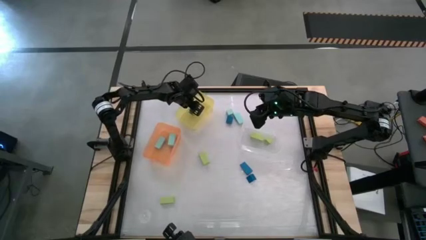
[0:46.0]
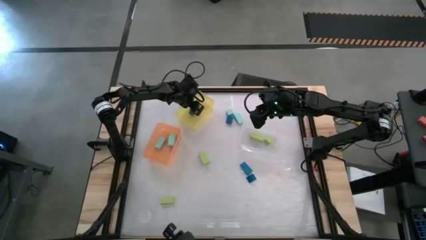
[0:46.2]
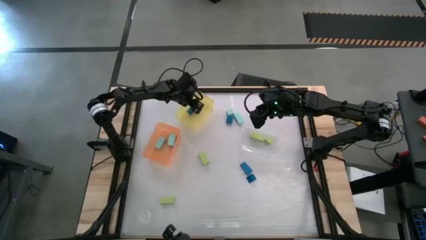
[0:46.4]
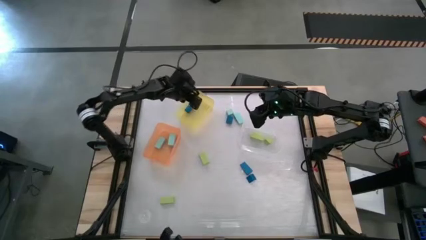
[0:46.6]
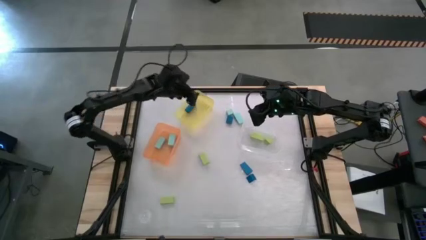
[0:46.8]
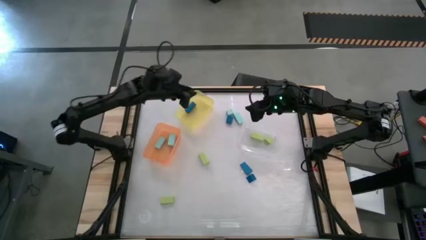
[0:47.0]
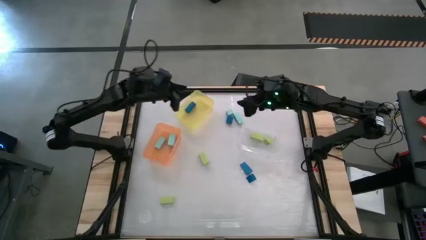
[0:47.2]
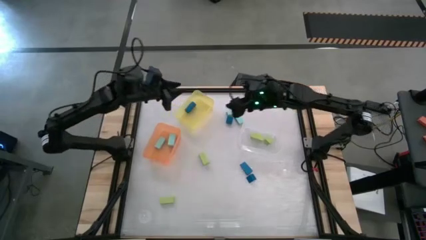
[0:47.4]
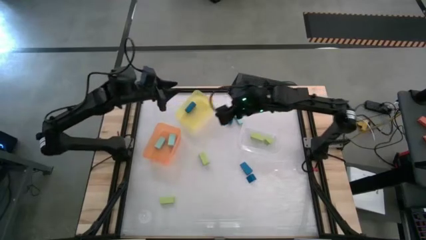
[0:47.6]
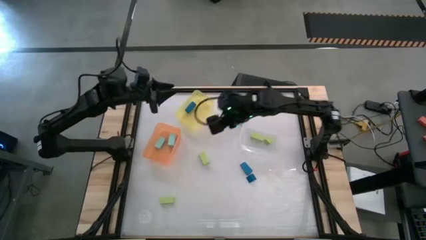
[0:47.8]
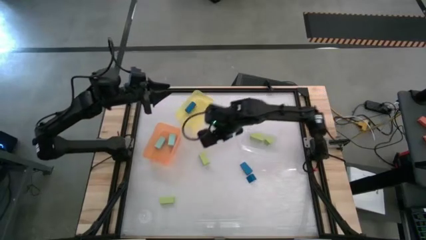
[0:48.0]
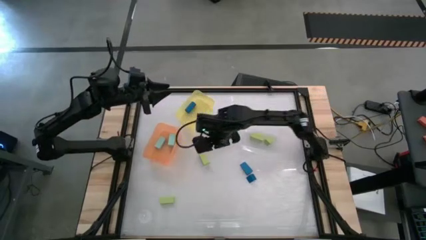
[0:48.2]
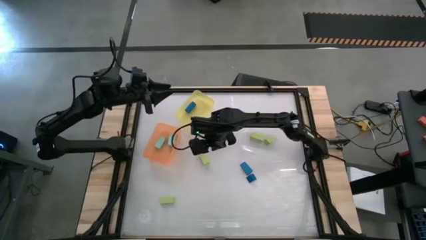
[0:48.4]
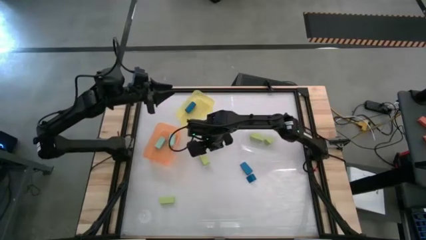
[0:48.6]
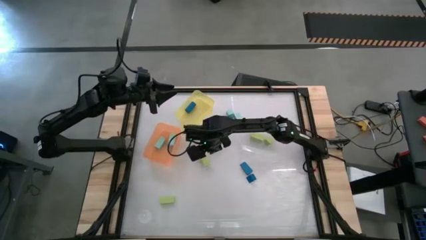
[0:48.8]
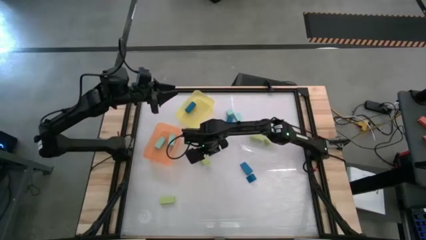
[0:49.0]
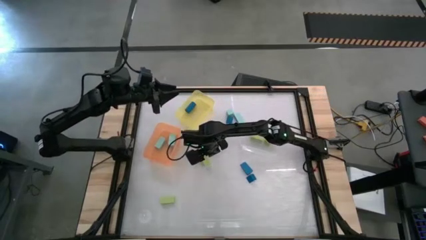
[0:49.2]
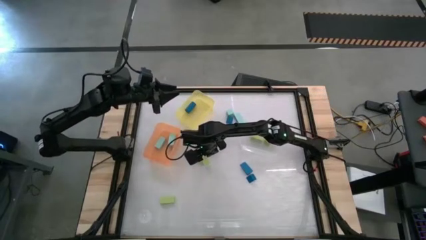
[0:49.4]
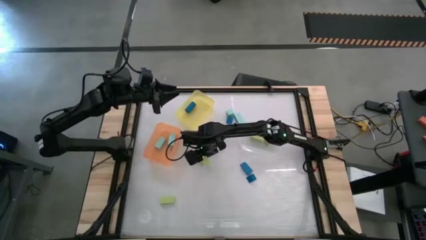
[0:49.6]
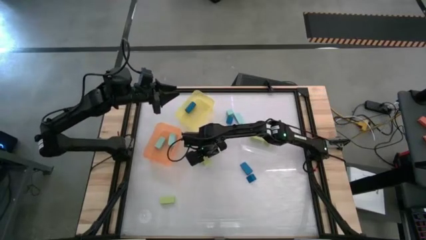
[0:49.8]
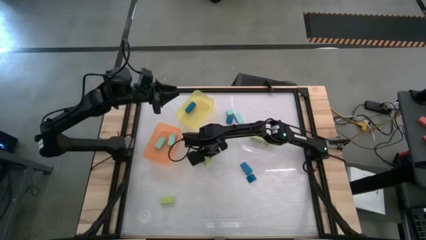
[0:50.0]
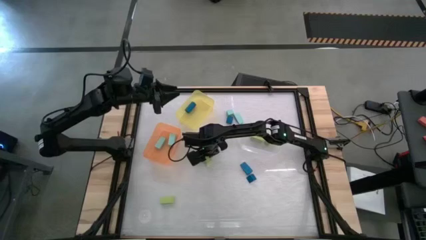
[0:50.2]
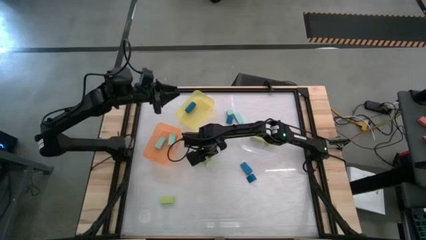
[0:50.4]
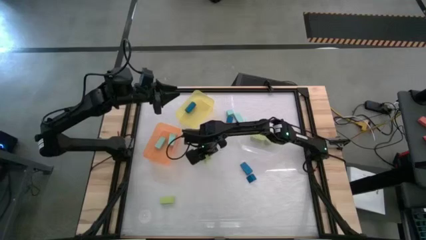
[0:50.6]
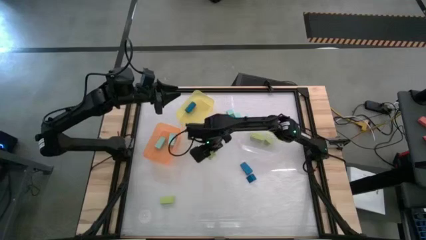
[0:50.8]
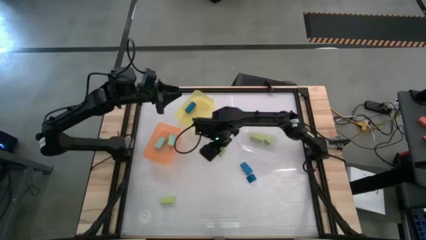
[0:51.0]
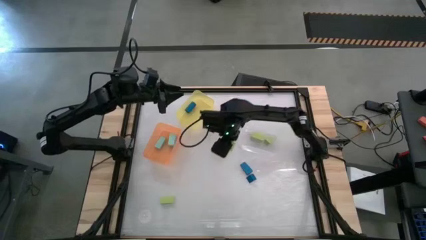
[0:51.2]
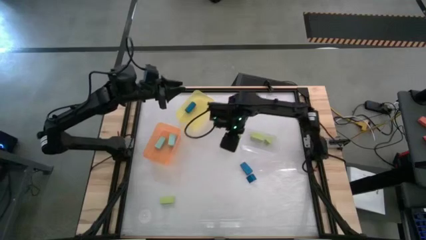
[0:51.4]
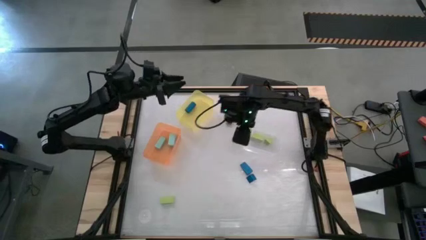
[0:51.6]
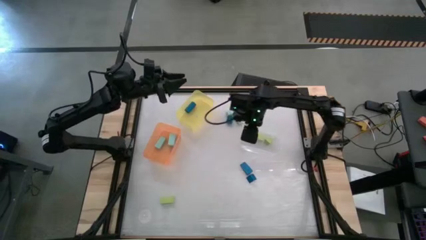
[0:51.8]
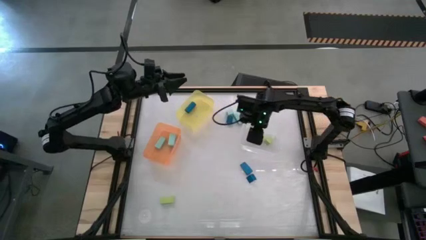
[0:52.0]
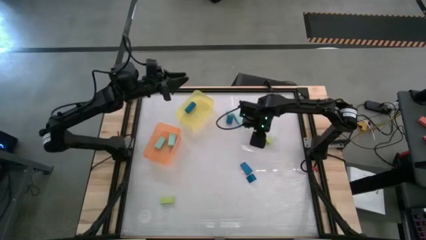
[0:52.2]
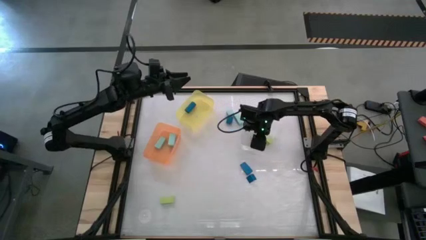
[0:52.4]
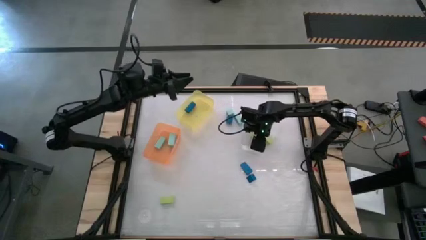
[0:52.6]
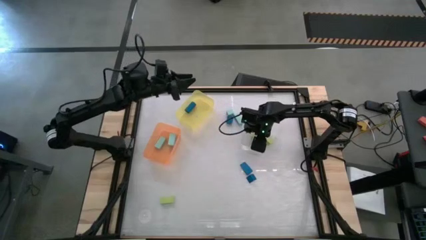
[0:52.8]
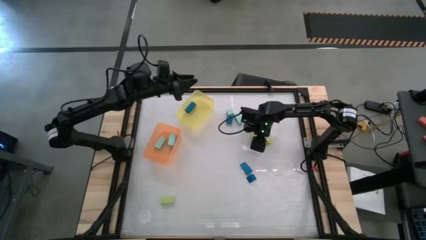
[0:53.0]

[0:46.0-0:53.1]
Task: Sort & place blocks by color
Put the green block into the transparent bin

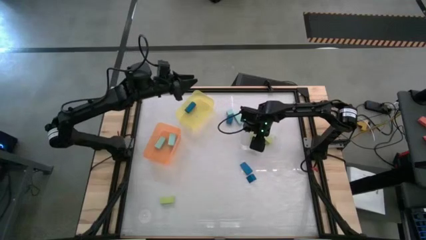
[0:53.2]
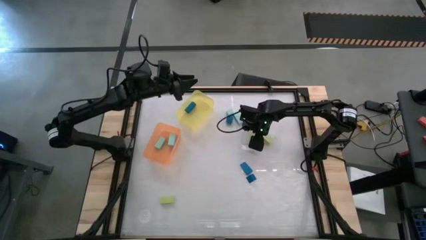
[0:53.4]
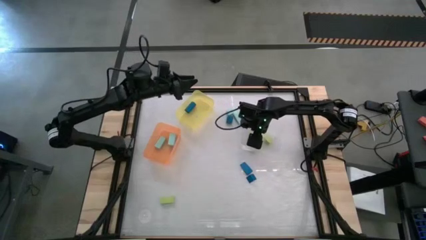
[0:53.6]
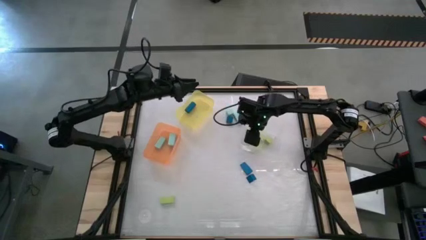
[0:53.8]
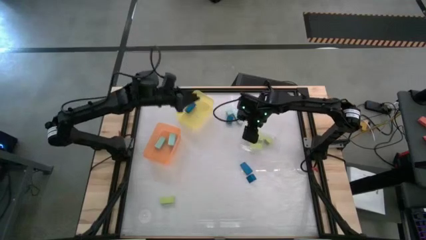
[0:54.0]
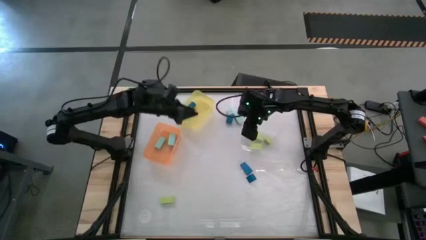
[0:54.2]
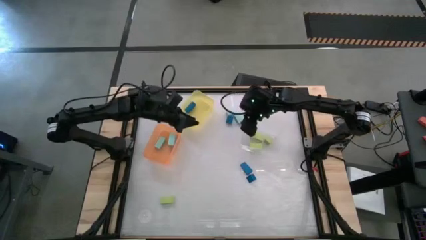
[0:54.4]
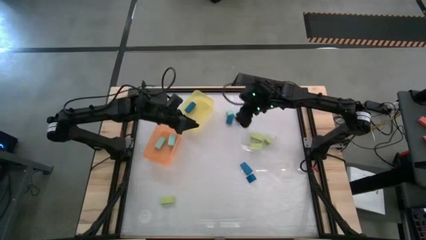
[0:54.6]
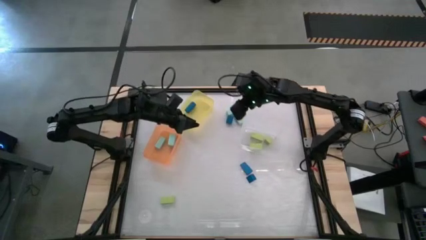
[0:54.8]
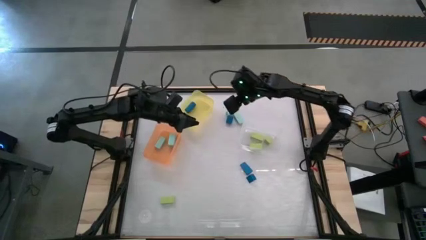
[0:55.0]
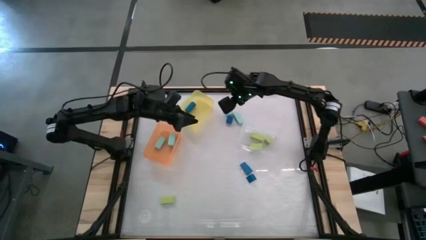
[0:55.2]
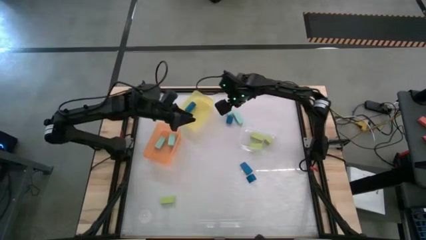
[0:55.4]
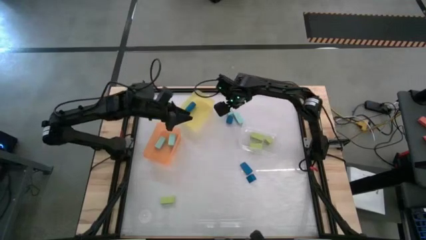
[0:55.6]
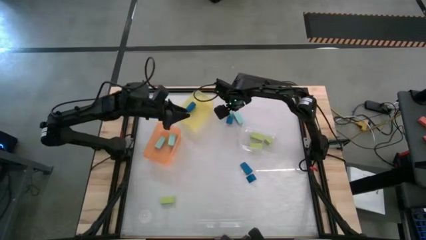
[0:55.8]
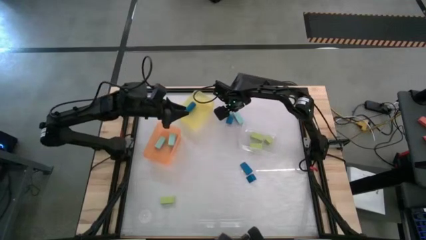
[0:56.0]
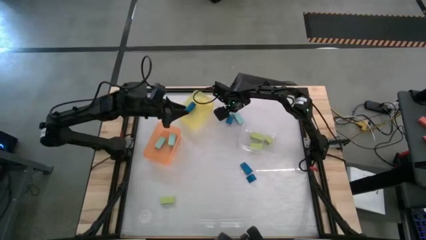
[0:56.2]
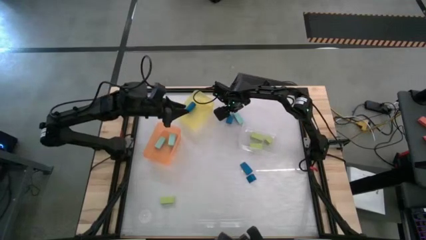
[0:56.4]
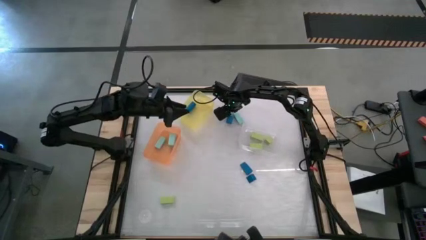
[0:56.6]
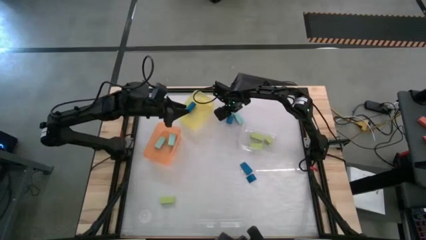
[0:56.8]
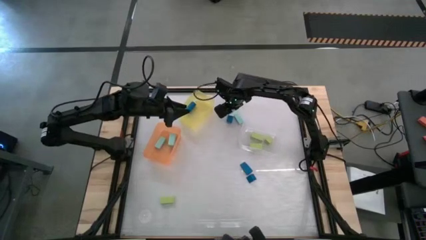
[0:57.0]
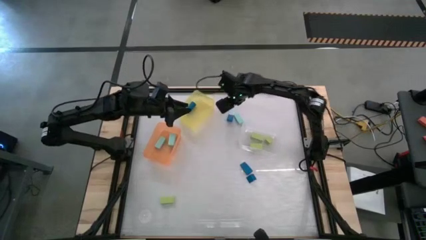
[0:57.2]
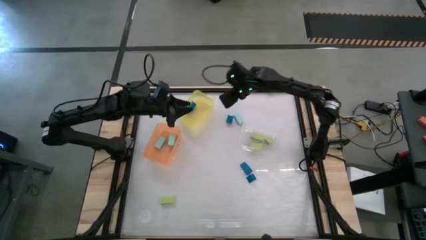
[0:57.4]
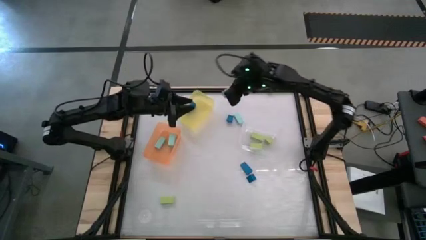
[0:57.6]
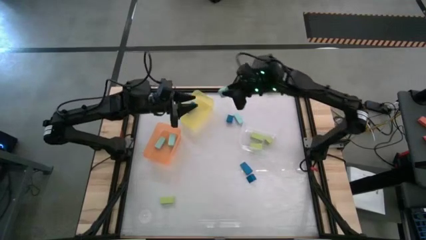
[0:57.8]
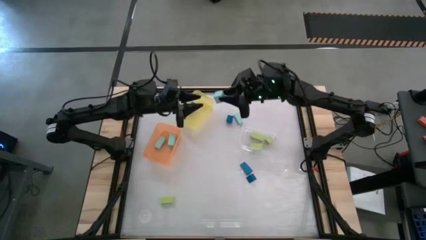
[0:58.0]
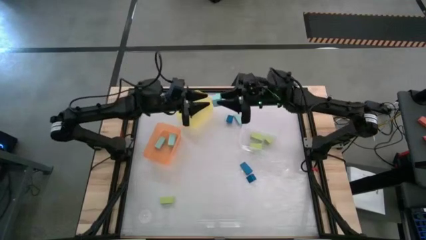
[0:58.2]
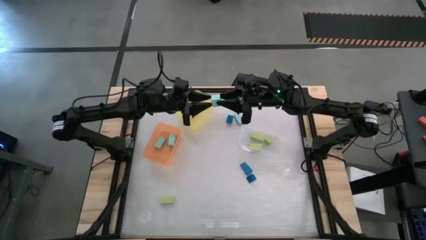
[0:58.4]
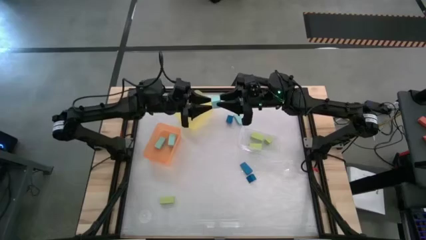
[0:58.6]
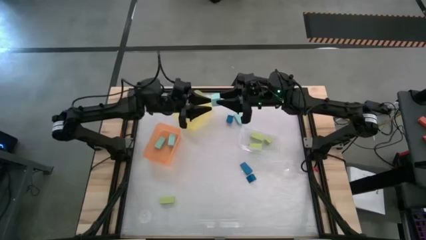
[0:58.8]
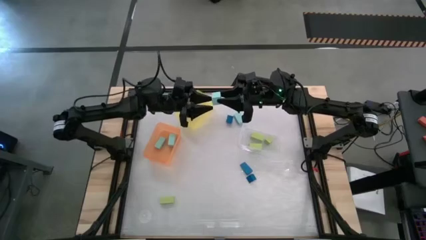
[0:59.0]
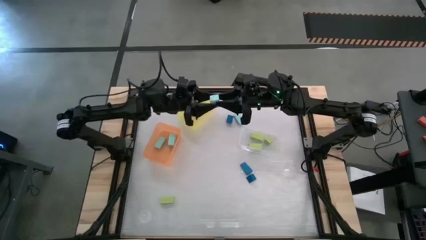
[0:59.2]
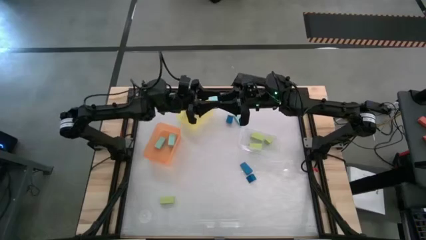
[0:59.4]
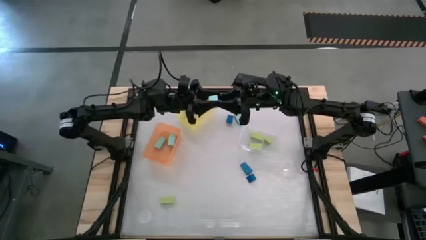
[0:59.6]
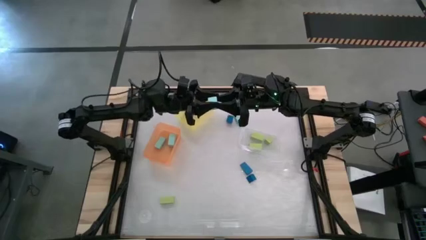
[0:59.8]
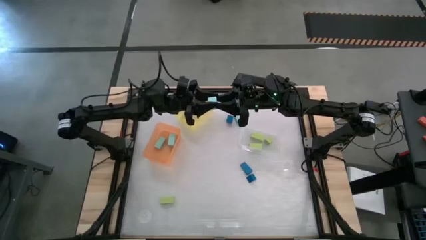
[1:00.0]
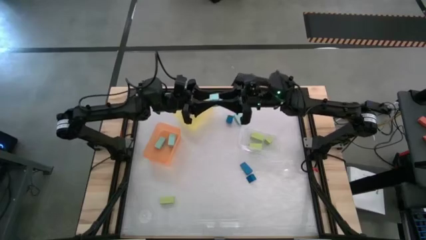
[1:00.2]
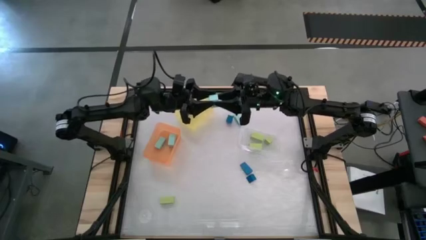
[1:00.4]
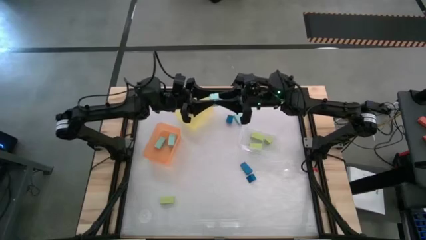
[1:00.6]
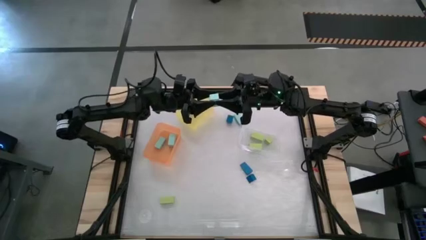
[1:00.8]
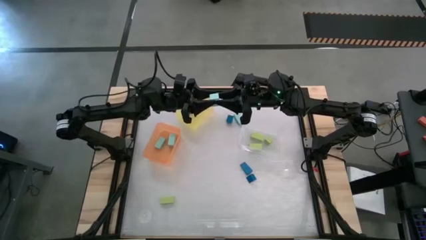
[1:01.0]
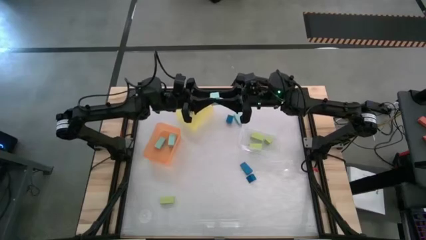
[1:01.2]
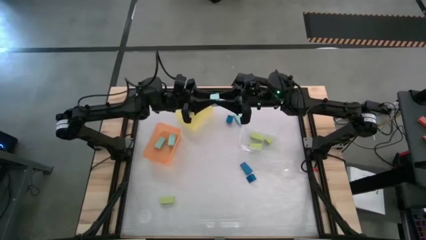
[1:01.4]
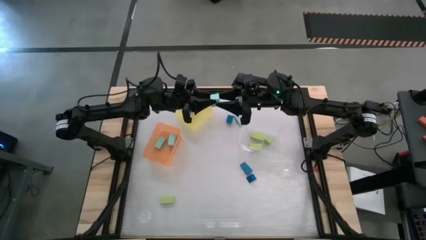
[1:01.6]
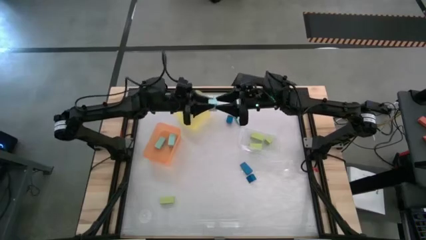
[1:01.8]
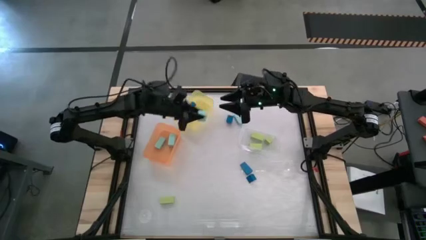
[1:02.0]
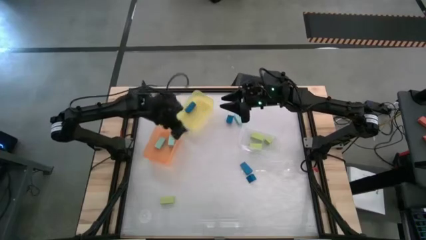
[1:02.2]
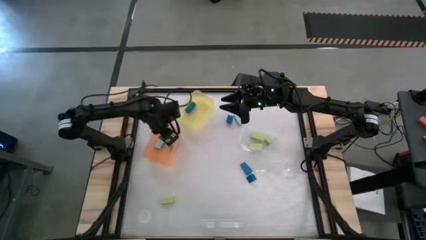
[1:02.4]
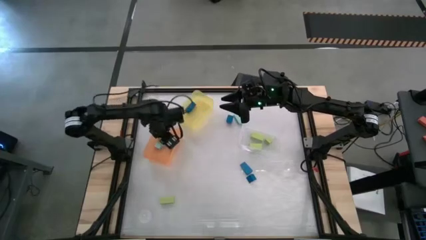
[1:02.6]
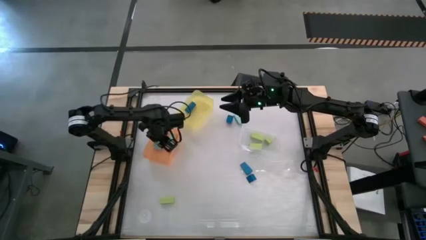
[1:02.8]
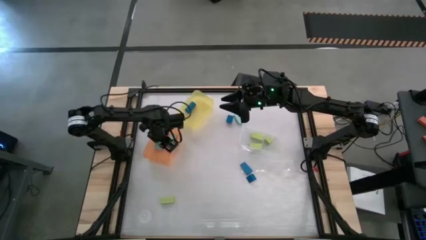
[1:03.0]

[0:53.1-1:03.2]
Put the light blue block into the orange bin
